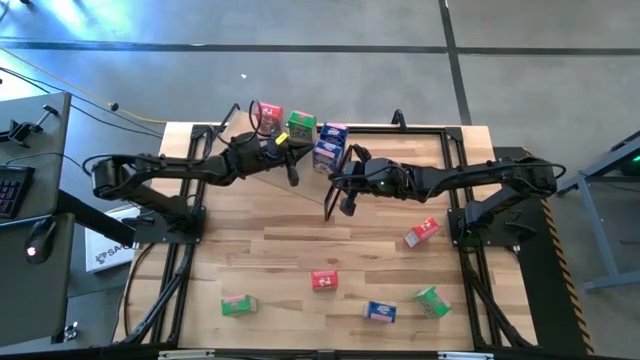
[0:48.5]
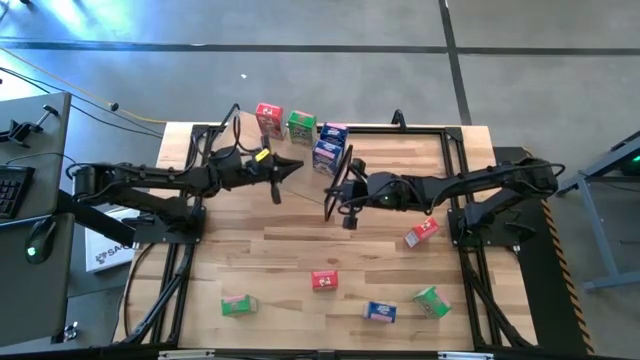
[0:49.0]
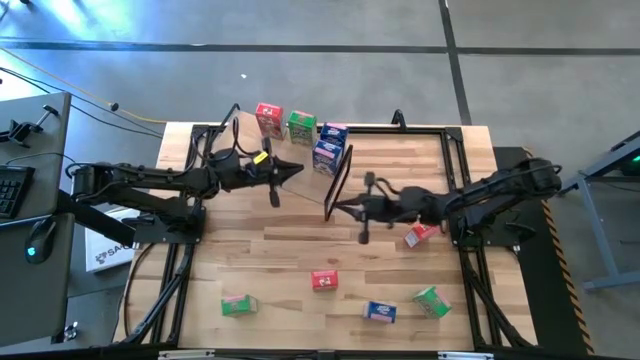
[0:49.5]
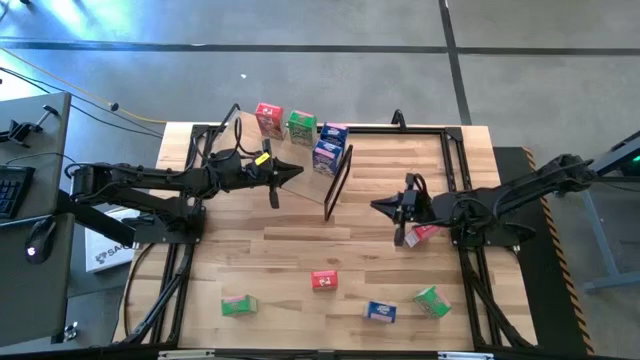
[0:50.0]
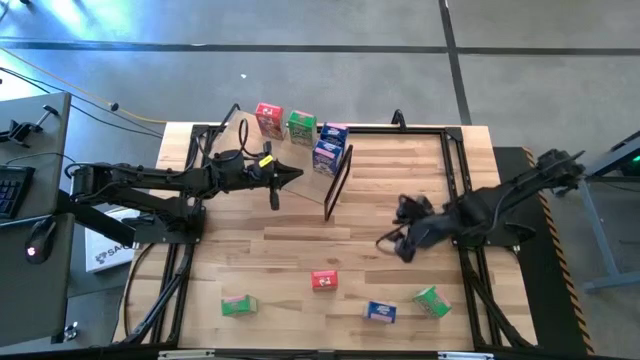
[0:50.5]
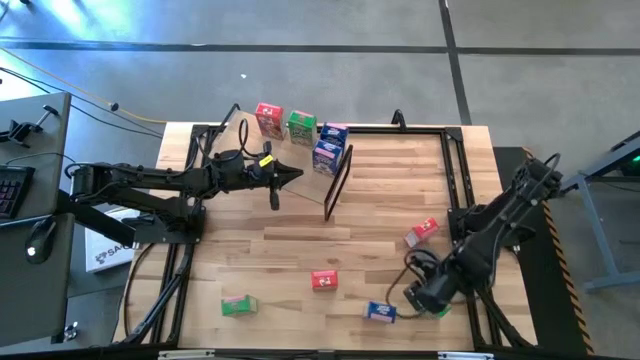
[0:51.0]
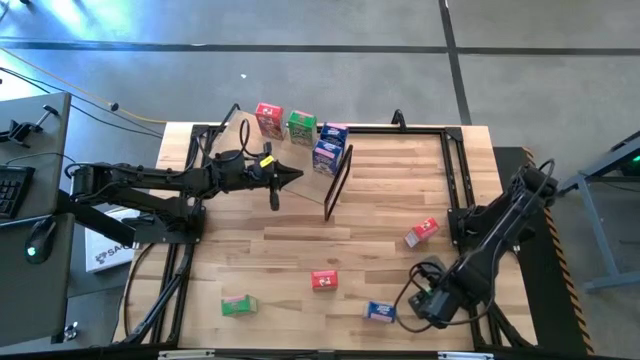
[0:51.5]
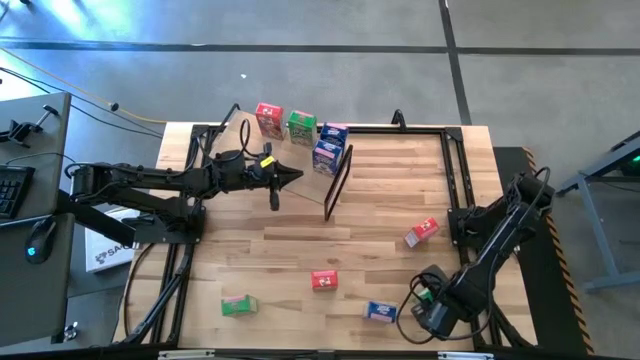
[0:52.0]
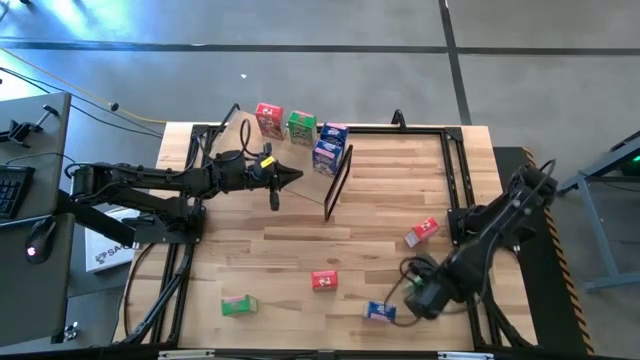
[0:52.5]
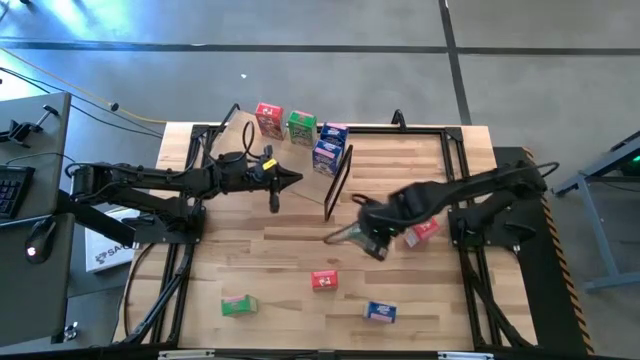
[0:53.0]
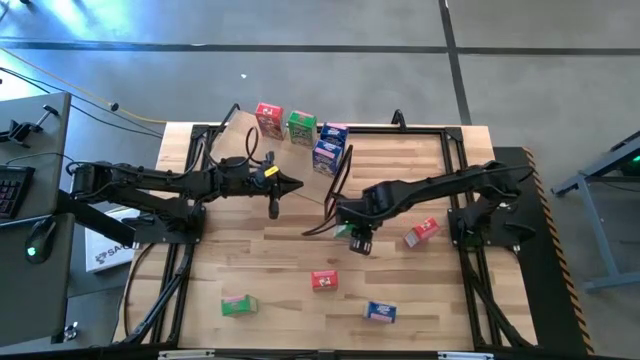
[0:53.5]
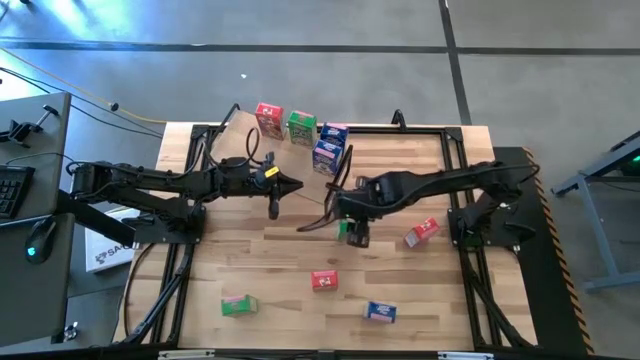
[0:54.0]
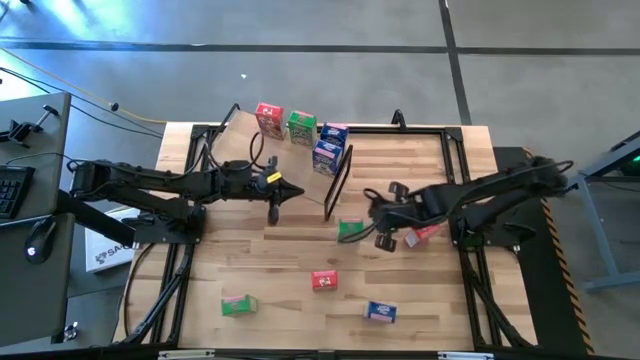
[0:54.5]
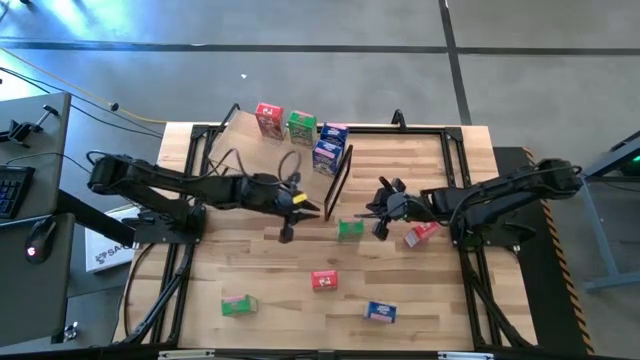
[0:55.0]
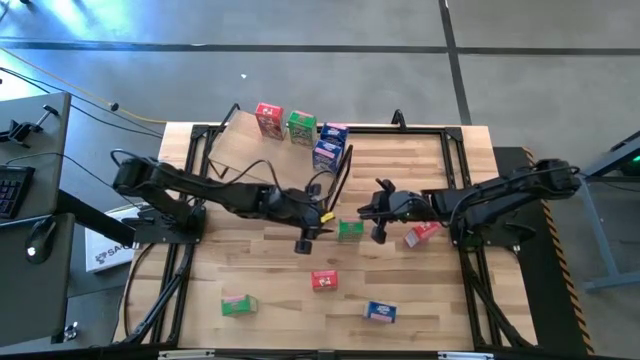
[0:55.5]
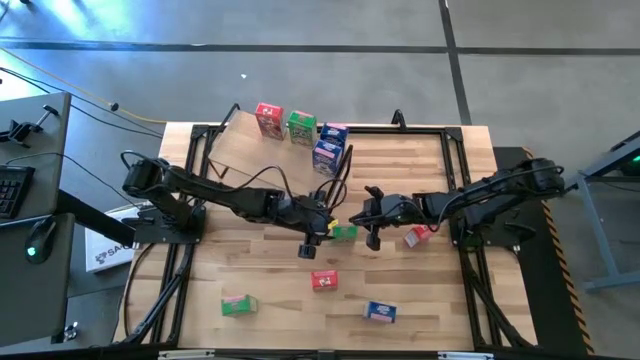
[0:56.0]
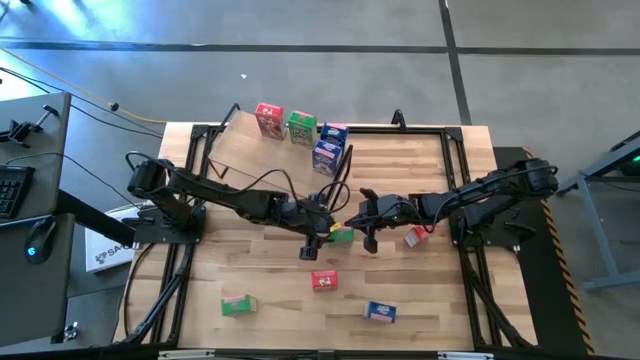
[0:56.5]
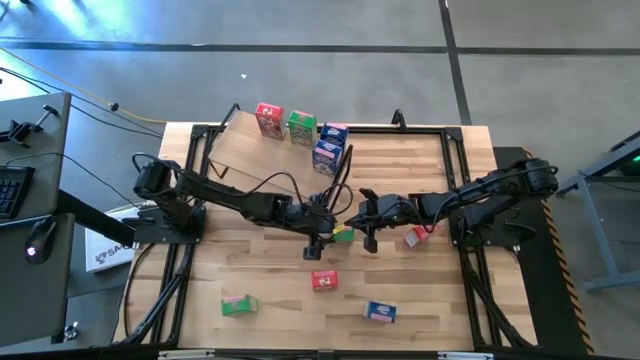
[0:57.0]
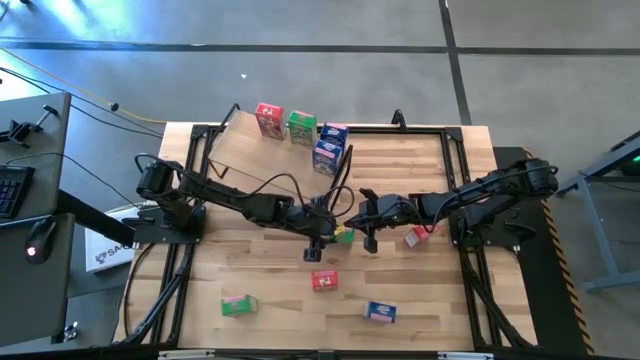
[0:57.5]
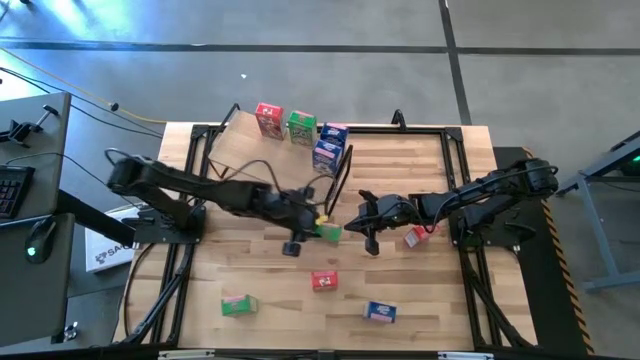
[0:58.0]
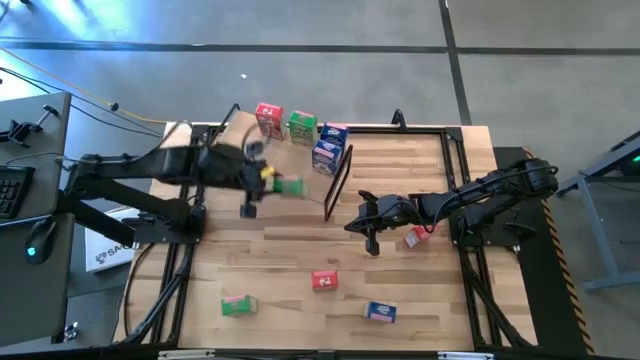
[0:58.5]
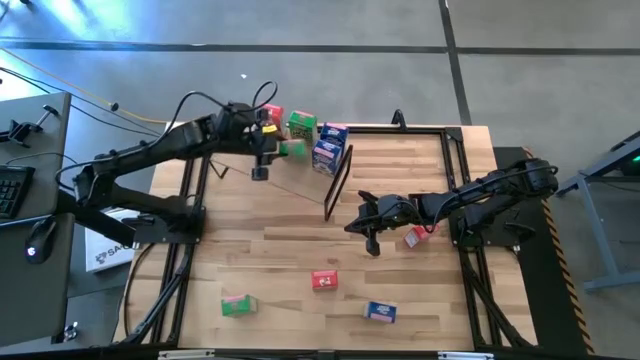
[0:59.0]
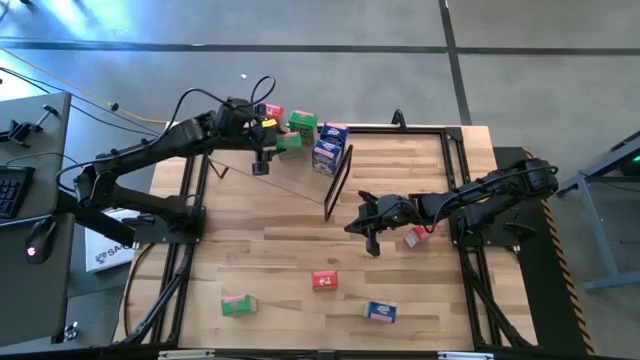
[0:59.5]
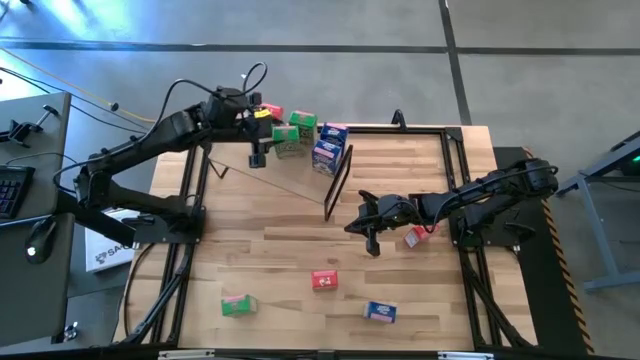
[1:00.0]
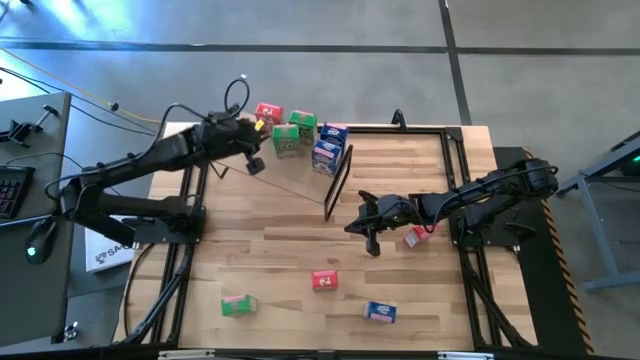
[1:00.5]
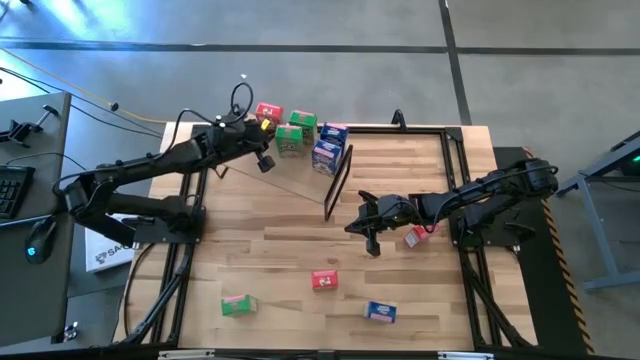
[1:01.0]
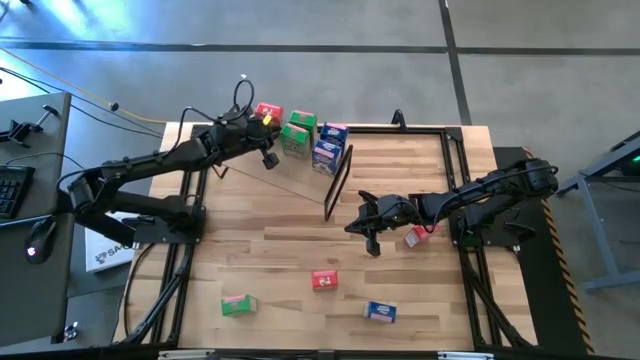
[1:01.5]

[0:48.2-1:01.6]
Task: Stack cereal on shelf
Put the right green cereal box on the shelf aligned with the other green cereal box

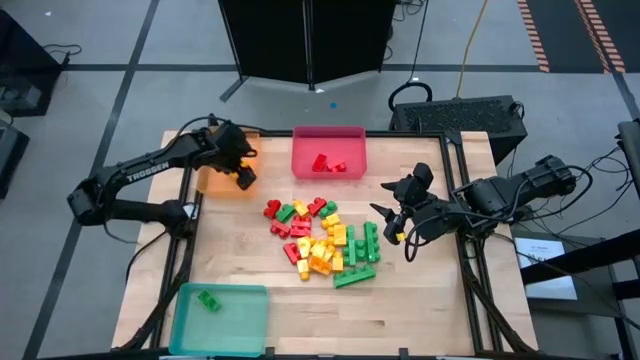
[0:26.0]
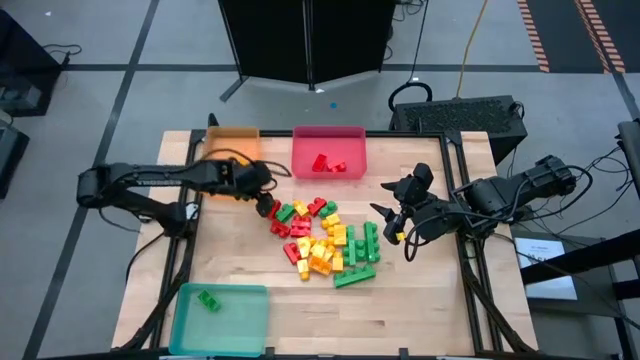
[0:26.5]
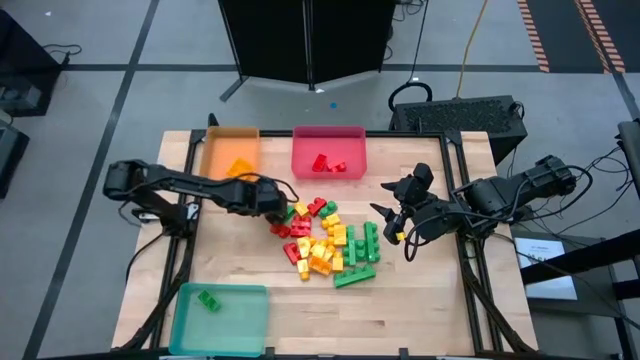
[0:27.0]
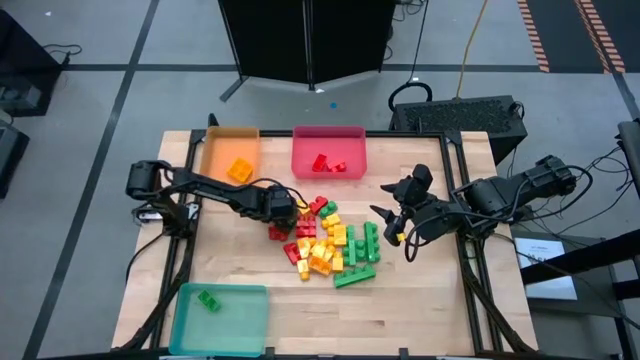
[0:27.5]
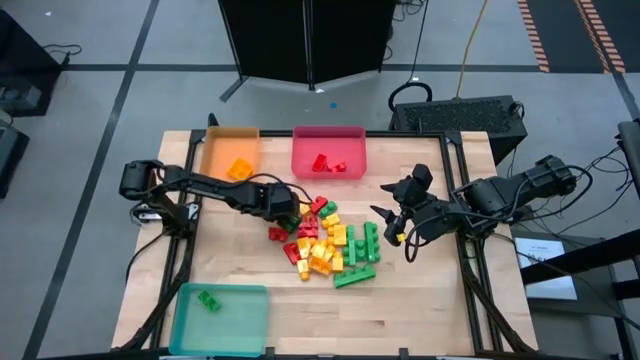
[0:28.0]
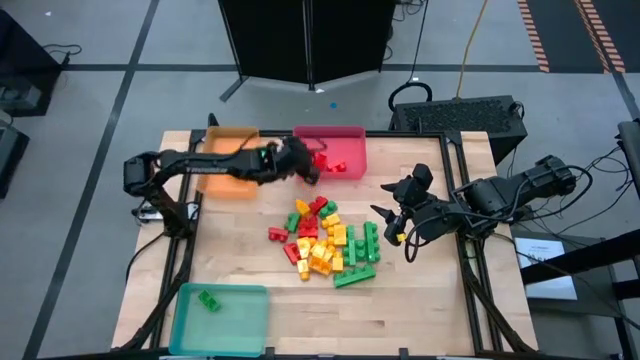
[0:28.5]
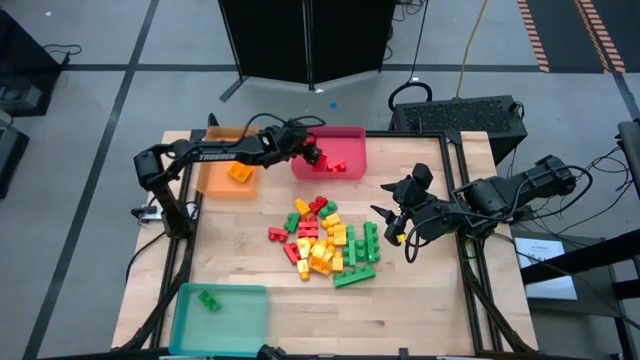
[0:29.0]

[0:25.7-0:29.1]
Task: Sort blocks
Put the red game piece into the red bin

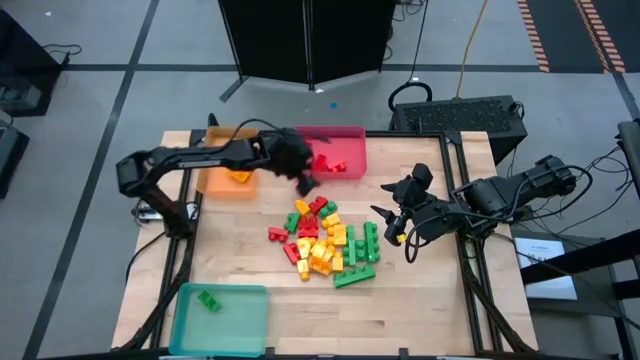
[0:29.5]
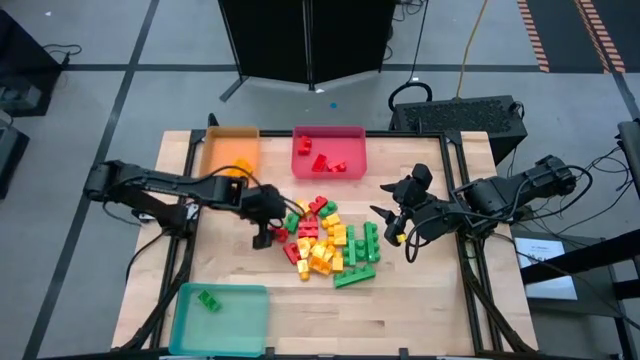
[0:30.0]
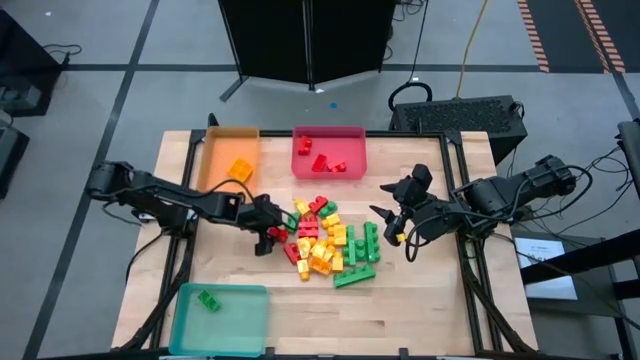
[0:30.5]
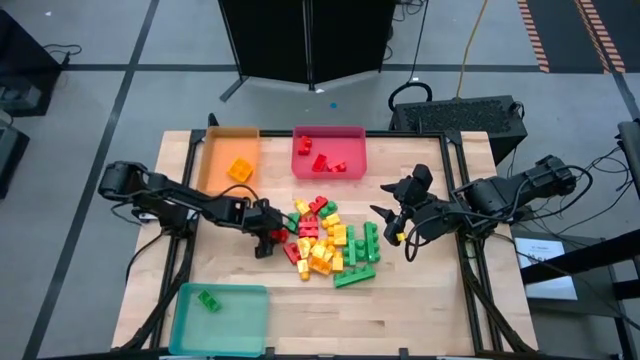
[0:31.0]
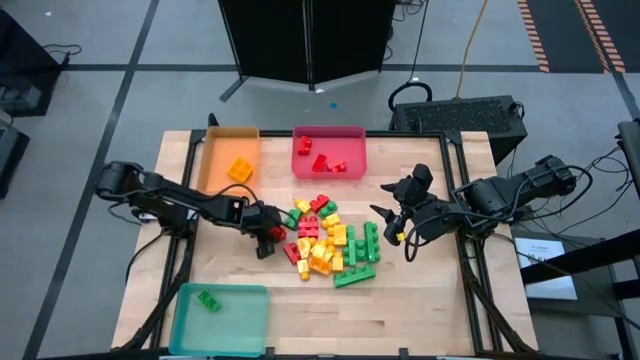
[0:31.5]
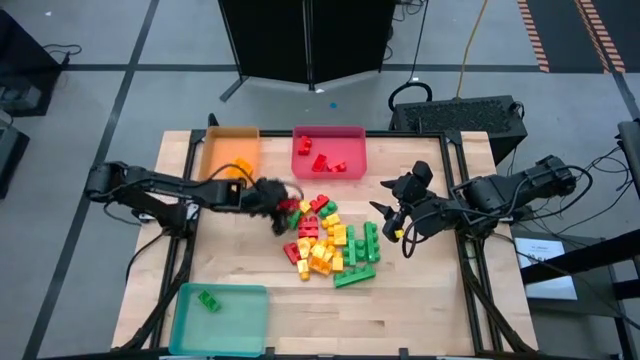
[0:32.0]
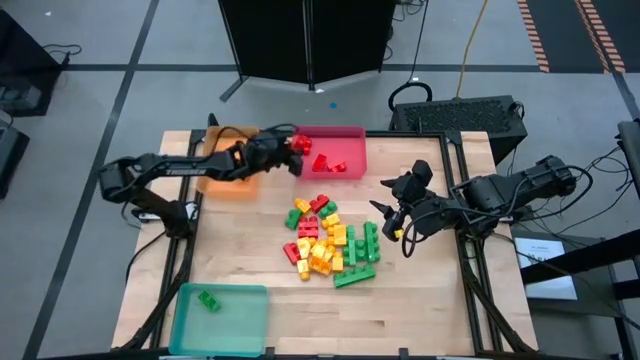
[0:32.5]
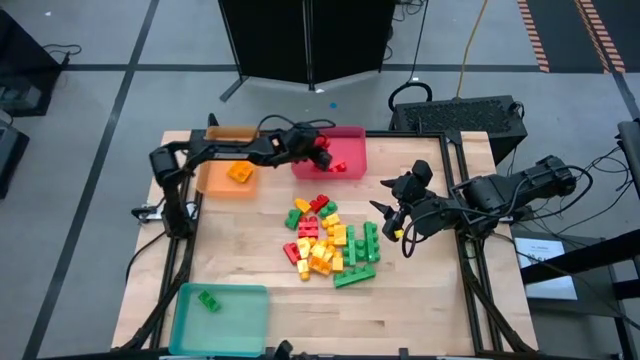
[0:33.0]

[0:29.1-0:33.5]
Put the red game piece into the red bin
